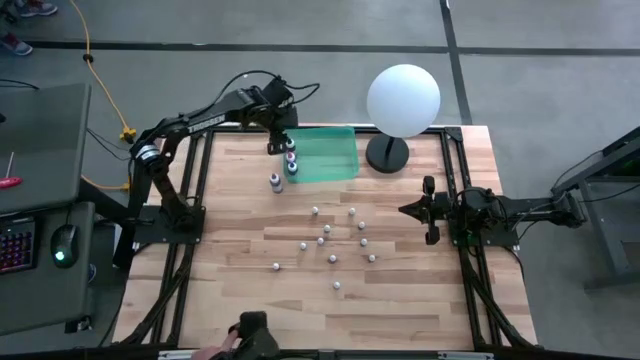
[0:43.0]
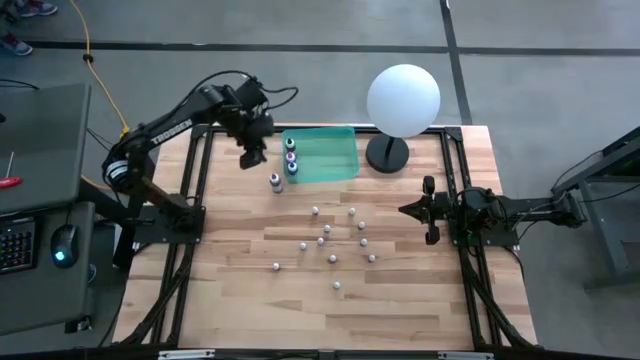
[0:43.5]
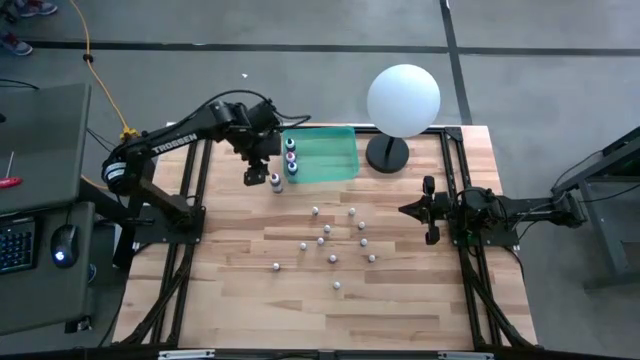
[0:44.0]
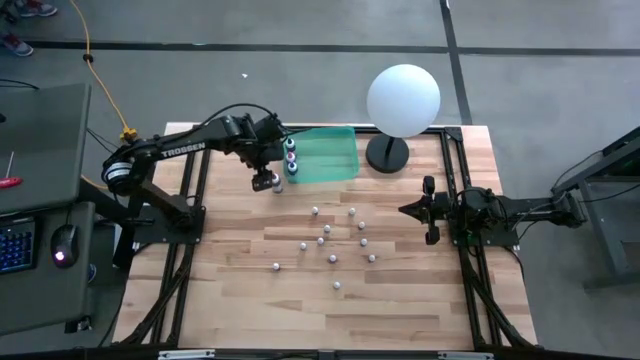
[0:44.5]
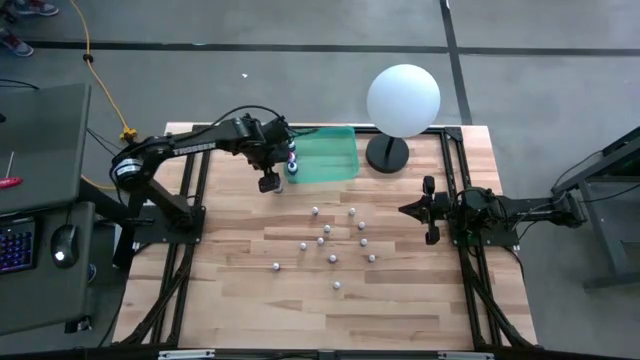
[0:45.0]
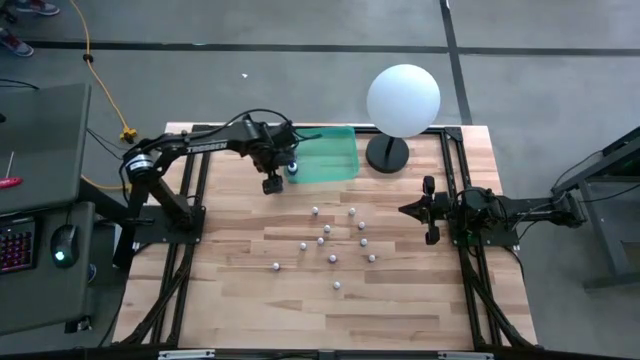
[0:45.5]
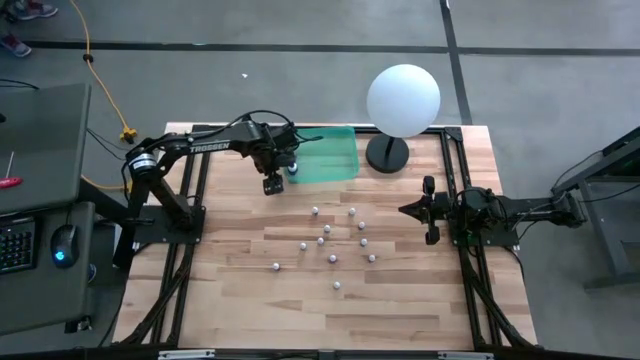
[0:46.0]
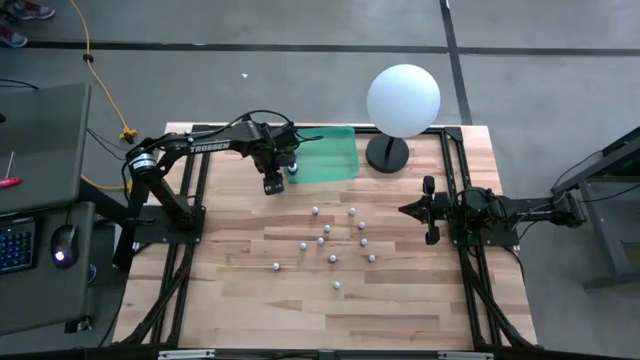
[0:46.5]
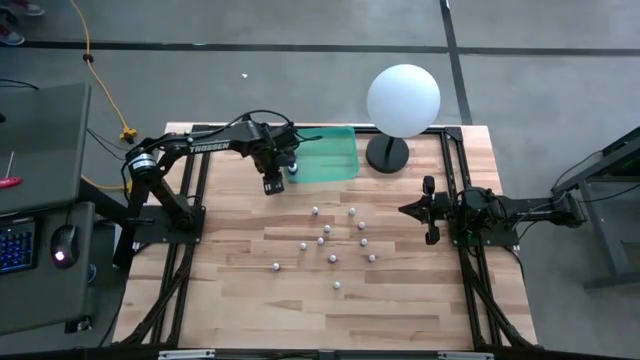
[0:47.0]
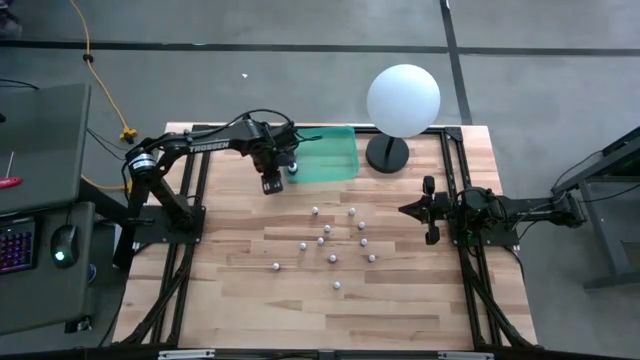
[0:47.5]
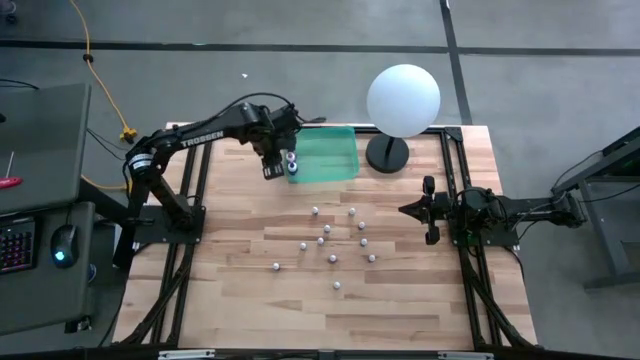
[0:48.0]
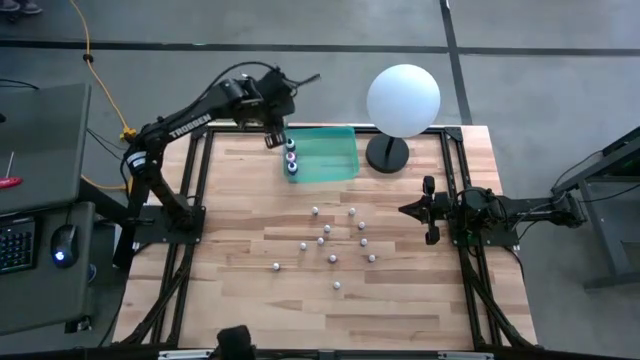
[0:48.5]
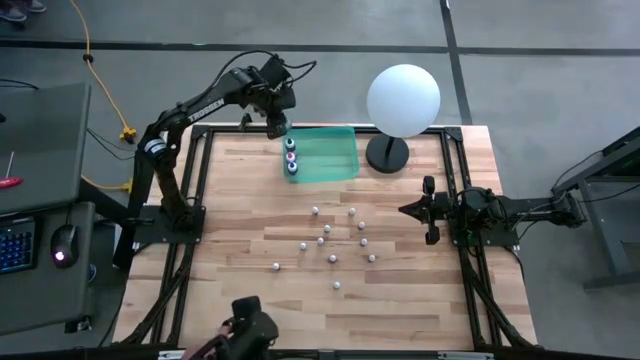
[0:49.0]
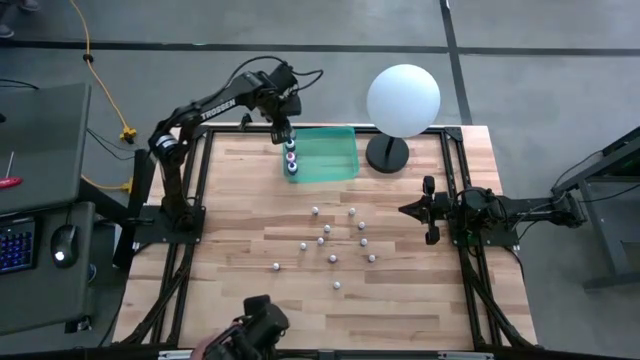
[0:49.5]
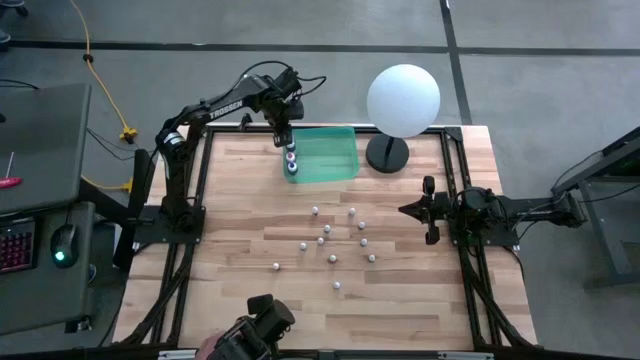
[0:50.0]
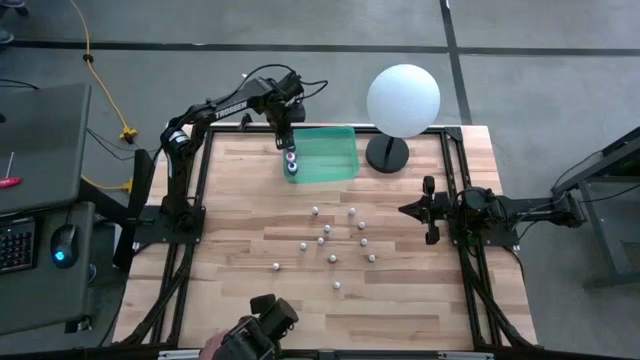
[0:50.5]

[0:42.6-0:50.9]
Task: Pick & Place food coloring
Put the large purple food coloring bottle into the green bin

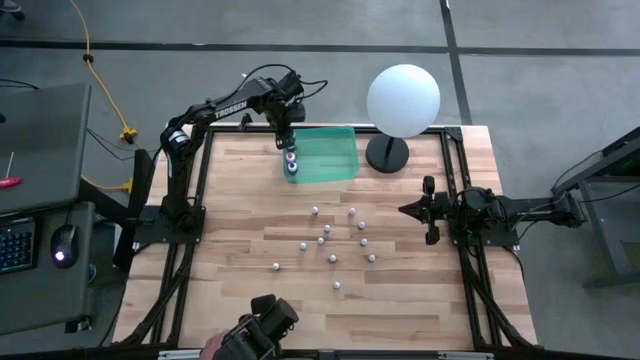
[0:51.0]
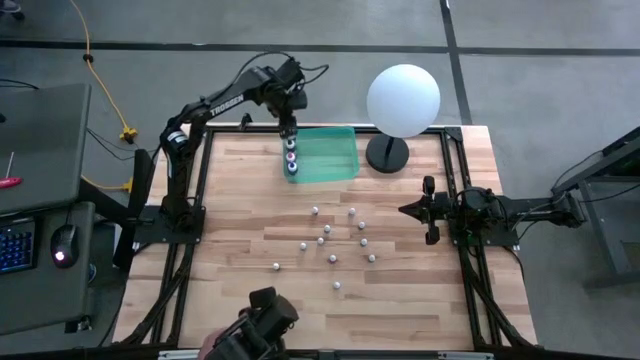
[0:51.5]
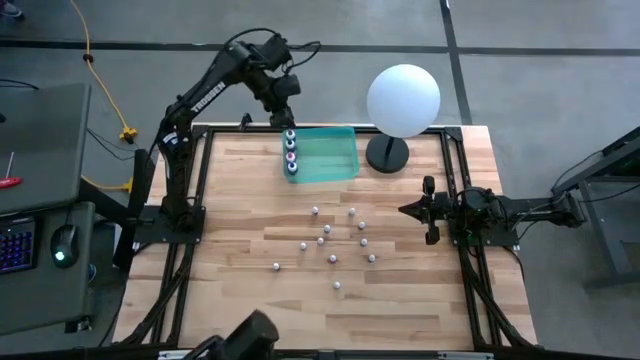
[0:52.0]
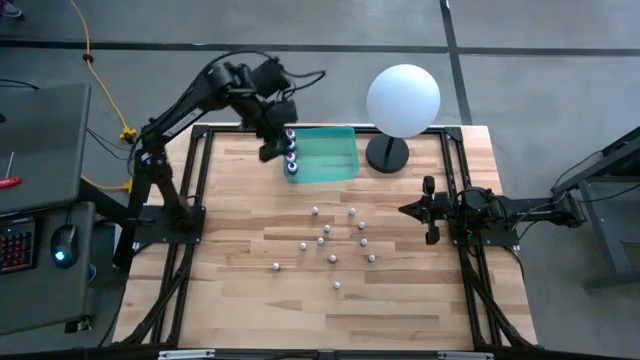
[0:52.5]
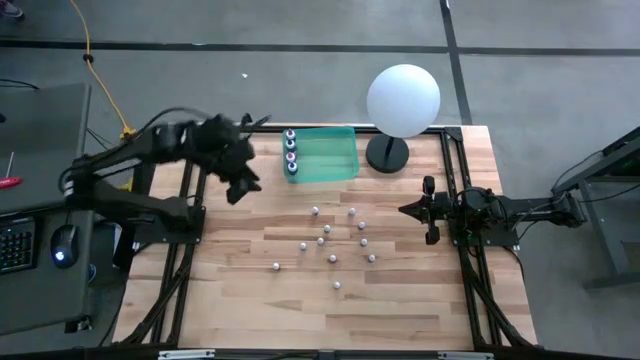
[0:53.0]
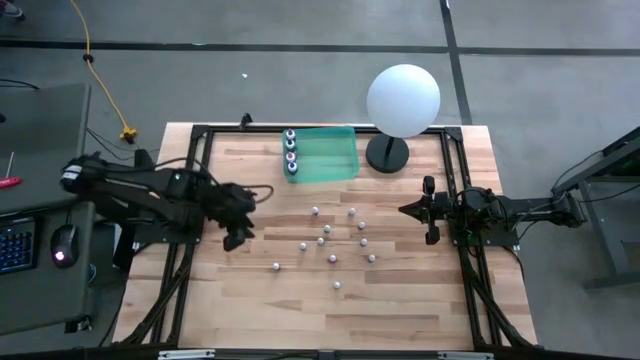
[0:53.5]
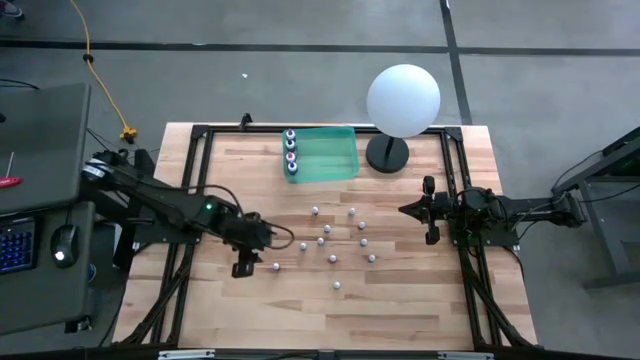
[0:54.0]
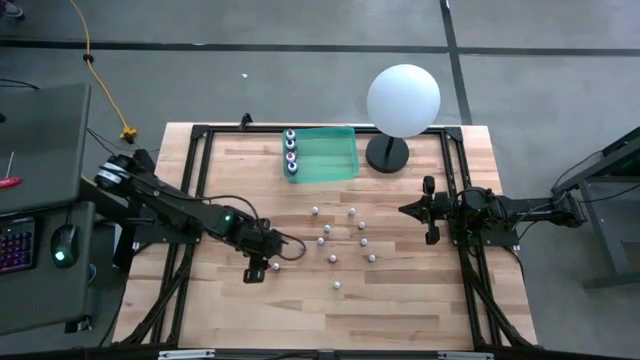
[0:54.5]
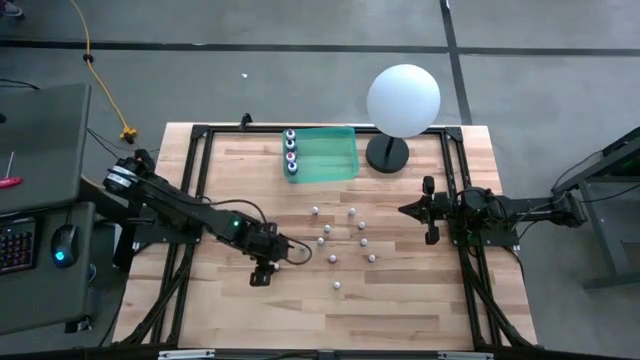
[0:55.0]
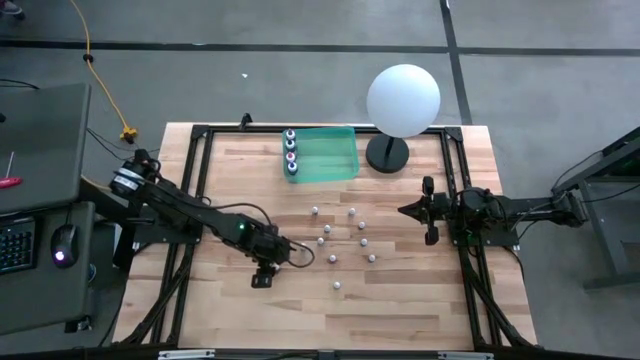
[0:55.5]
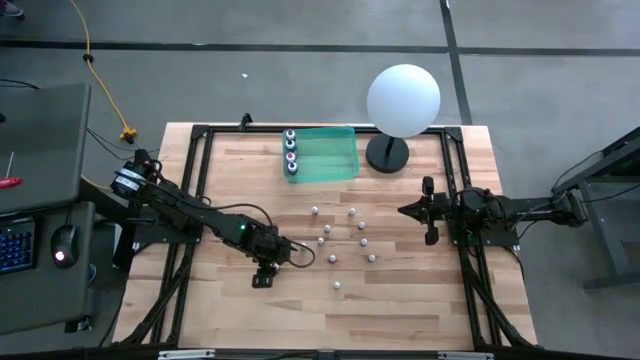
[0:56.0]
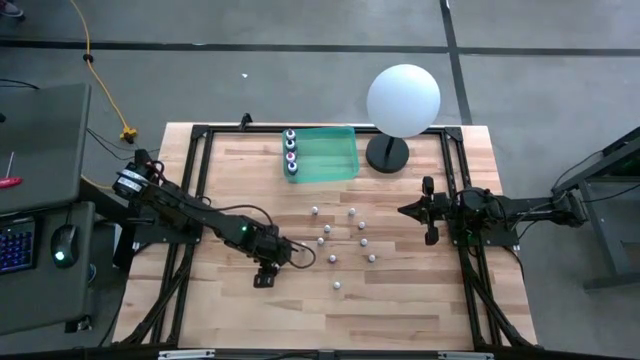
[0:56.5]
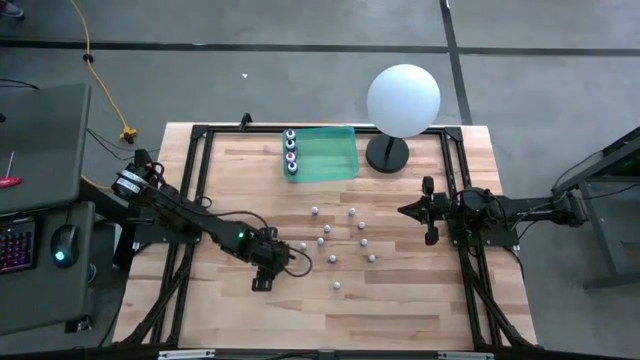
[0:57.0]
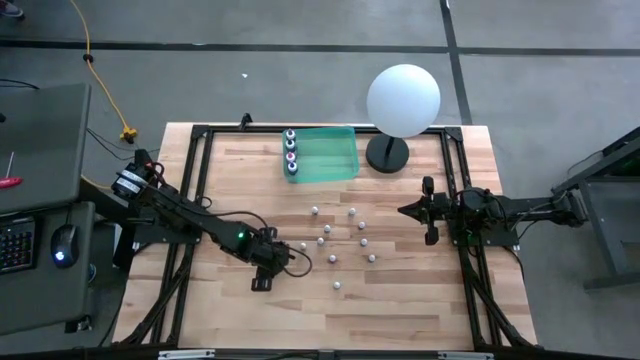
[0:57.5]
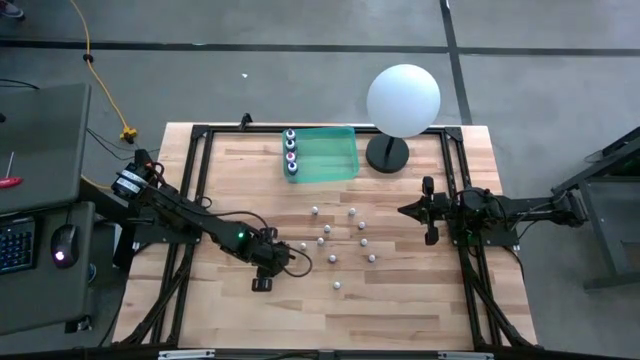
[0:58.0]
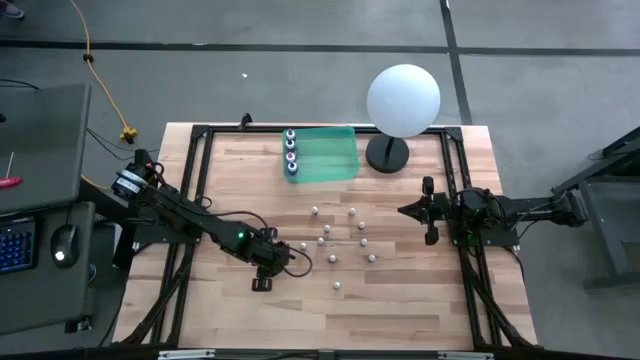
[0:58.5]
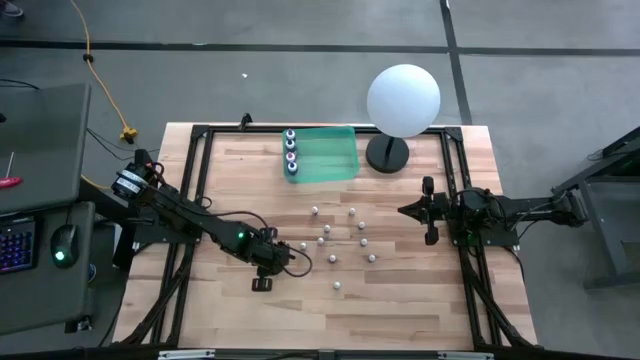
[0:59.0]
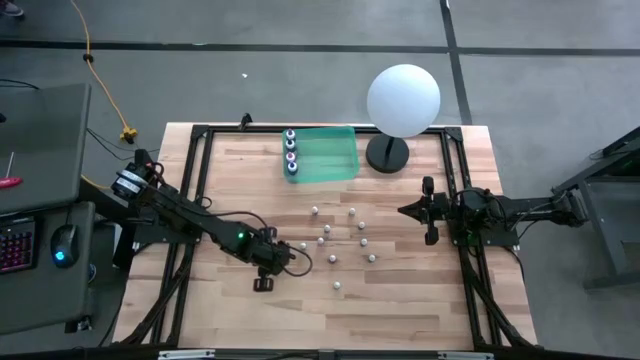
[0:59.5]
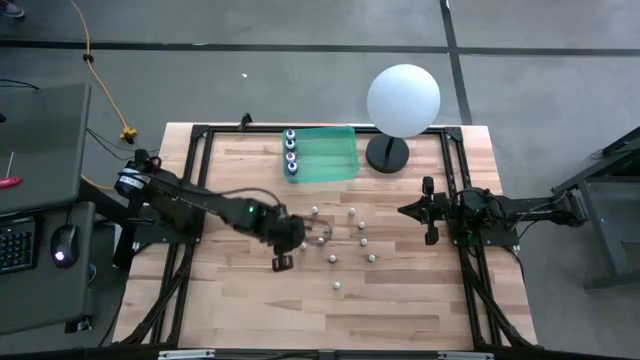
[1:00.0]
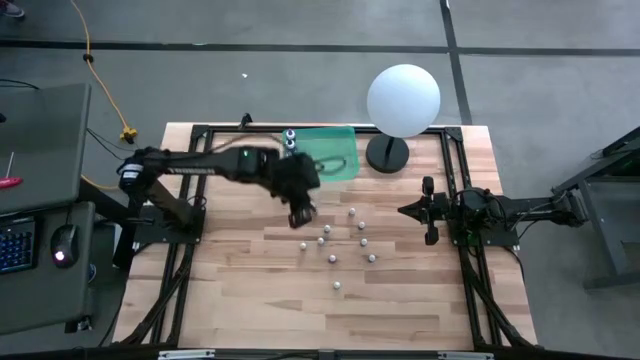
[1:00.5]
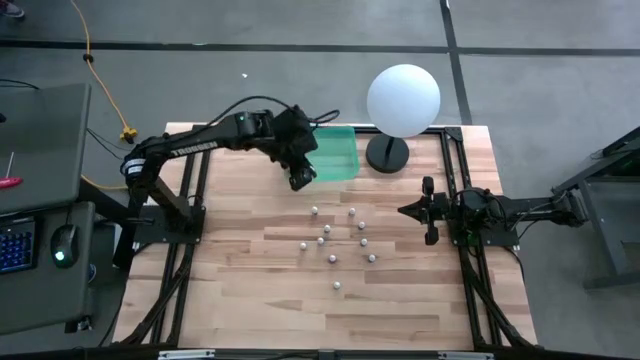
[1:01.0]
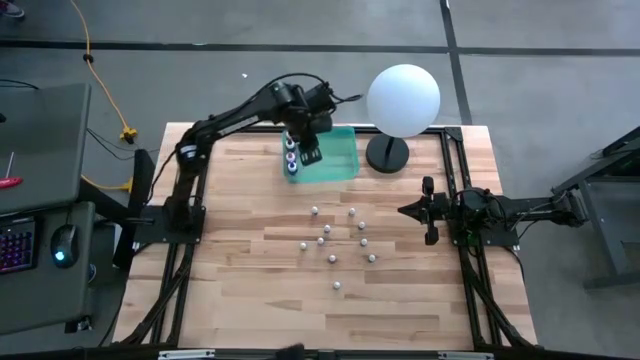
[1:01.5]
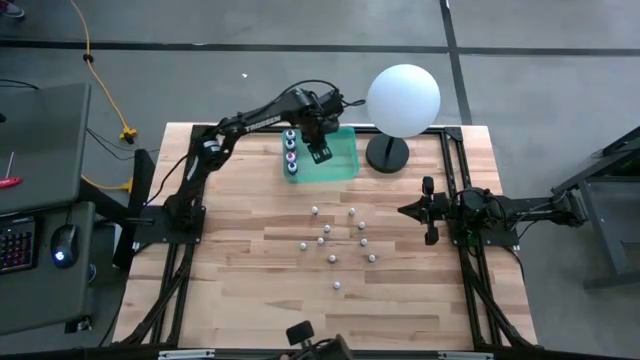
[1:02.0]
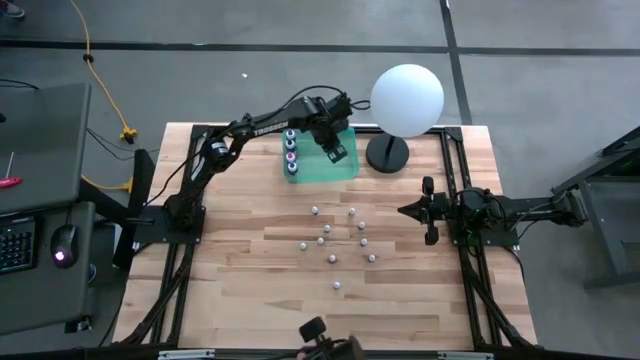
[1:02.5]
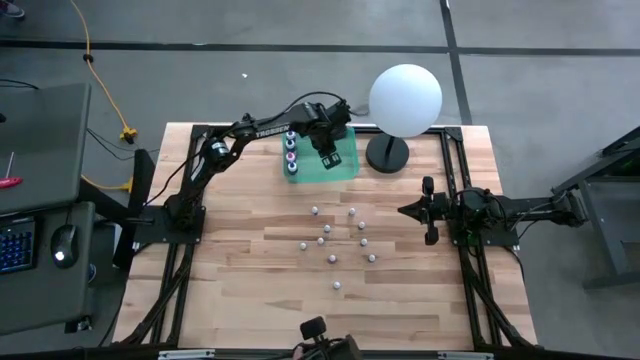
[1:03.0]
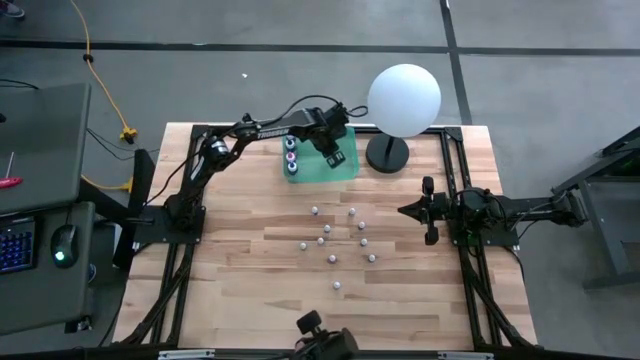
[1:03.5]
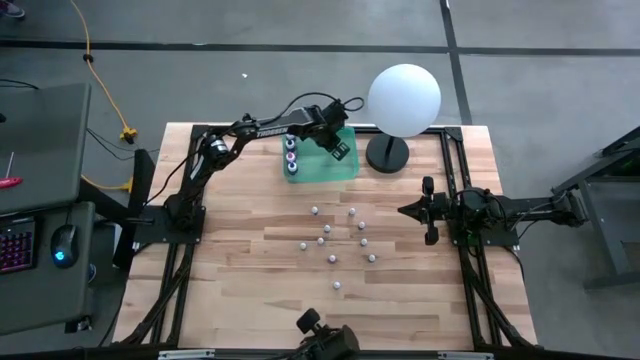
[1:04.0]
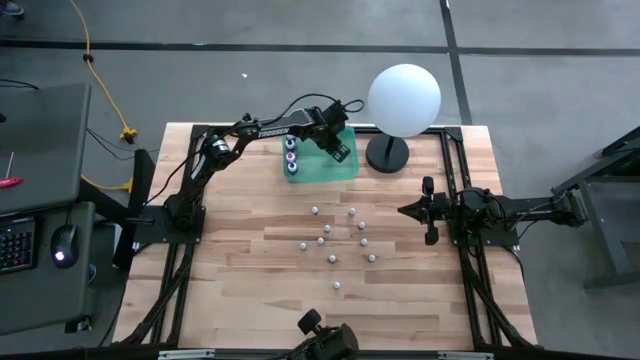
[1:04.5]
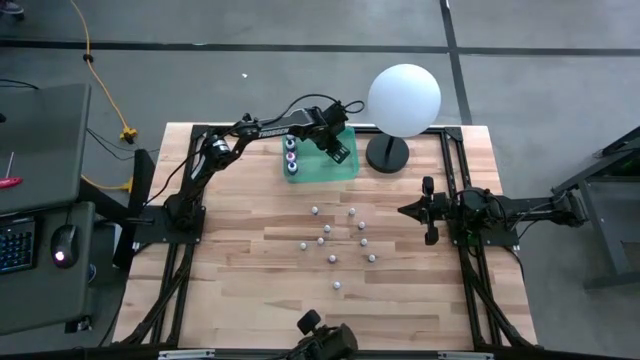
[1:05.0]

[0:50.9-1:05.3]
Put the small red food coloring bottle into the green bin
